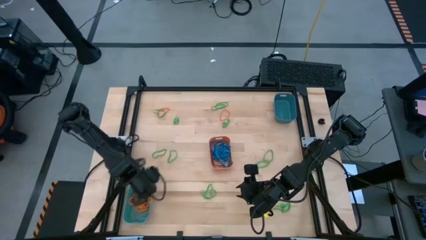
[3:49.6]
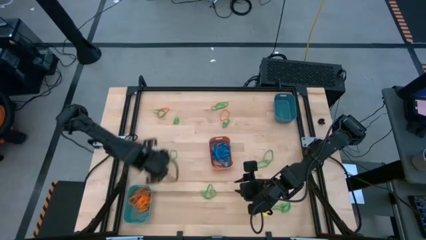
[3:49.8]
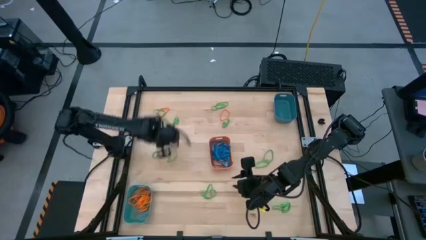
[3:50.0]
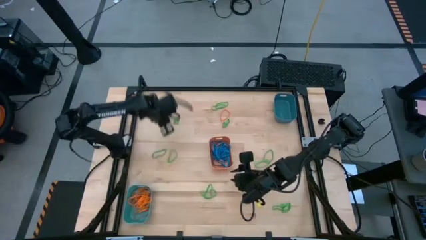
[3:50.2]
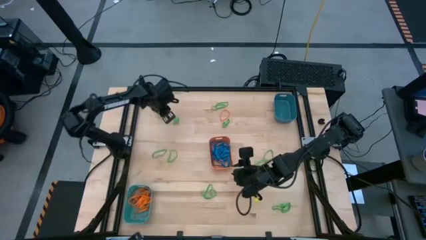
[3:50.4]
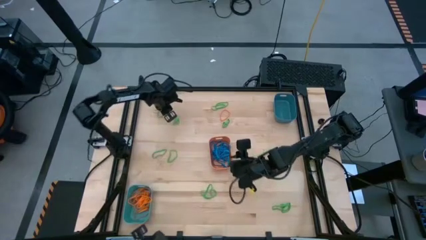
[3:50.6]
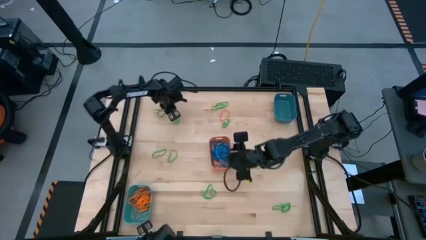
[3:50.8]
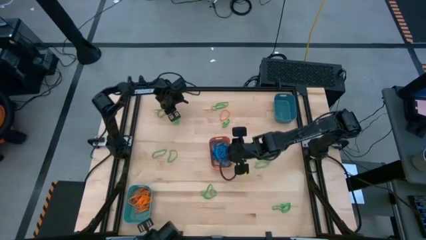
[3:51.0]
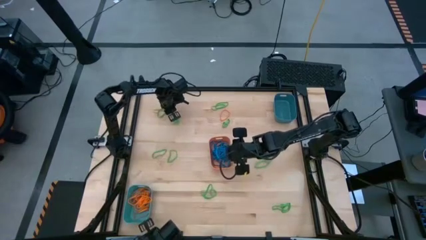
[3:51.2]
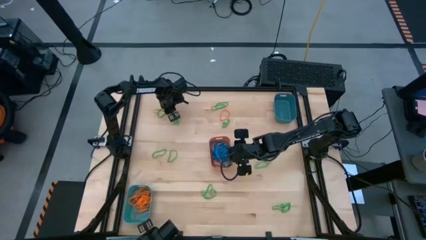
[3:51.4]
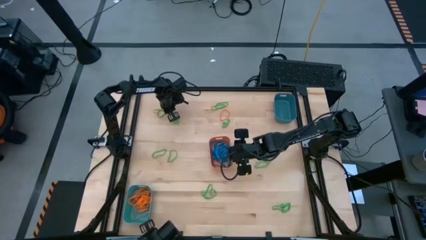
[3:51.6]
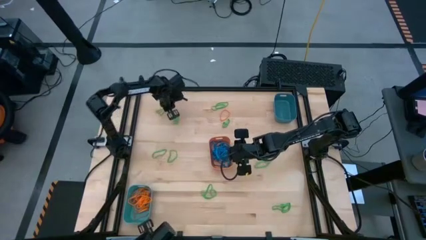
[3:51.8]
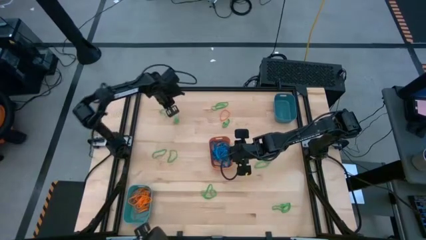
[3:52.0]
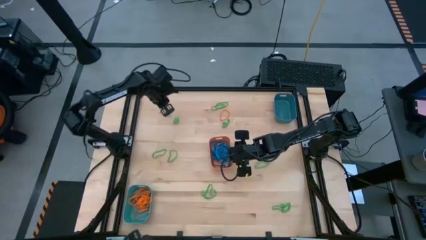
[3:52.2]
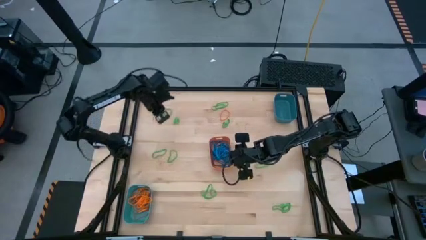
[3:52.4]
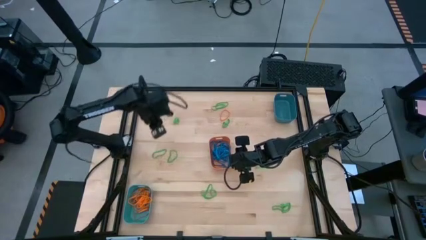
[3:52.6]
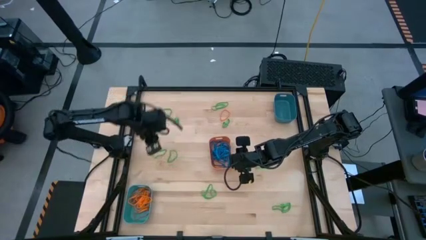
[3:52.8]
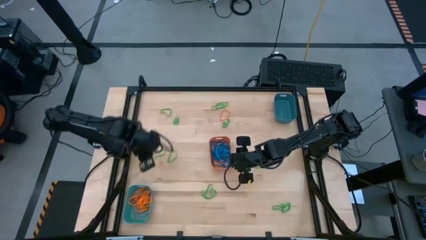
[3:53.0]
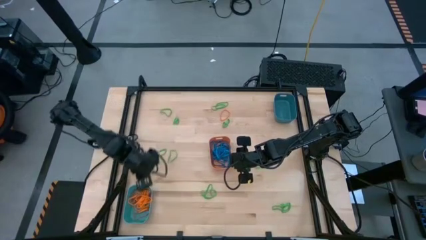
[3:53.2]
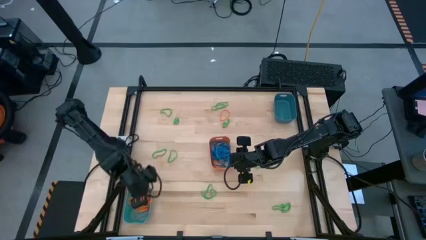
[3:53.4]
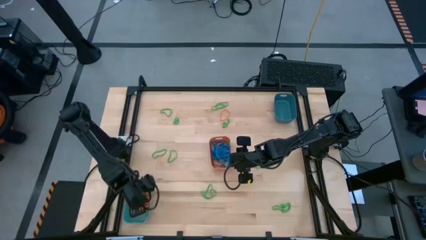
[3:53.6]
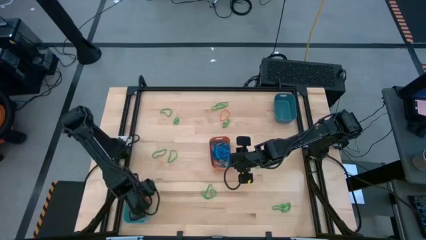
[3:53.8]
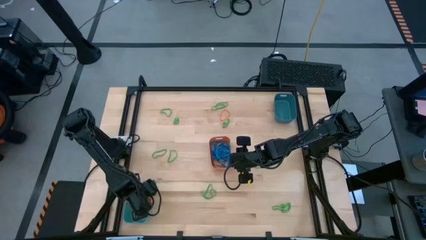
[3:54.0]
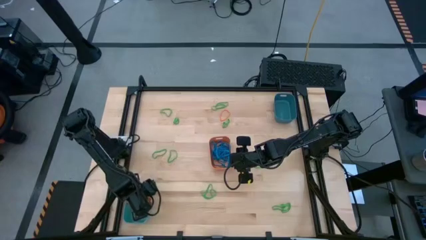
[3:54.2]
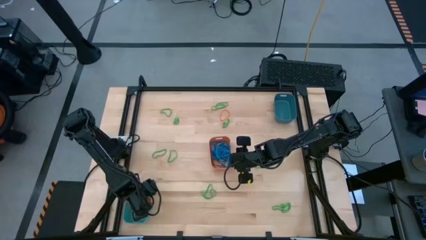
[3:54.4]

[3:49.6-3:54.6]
Task: Sort rubber bands into baskets
Put the orange rubber band into the green bin

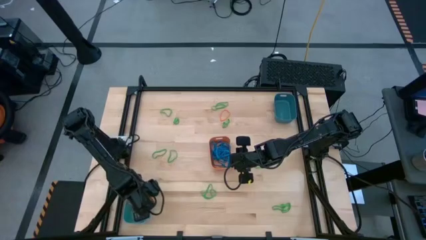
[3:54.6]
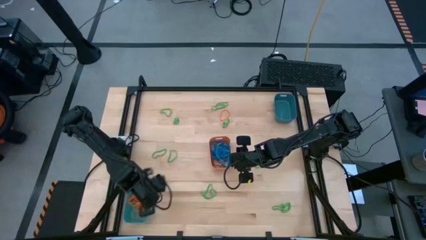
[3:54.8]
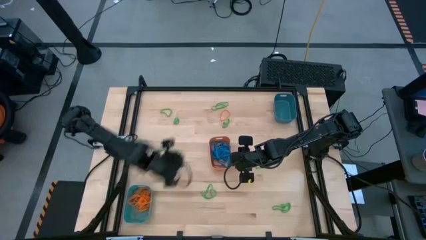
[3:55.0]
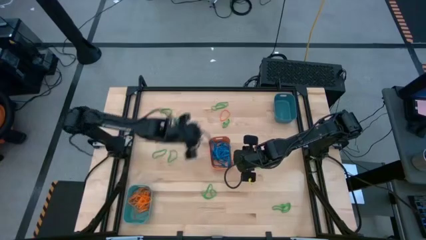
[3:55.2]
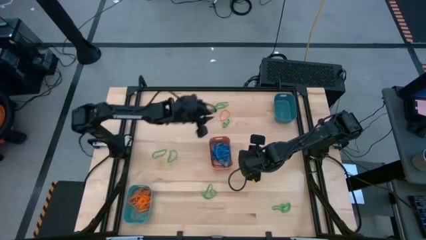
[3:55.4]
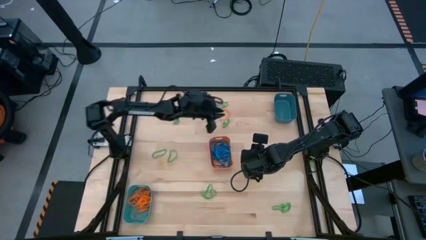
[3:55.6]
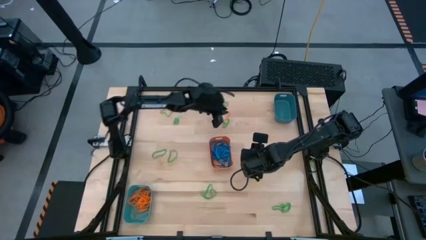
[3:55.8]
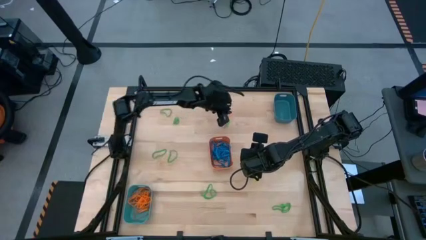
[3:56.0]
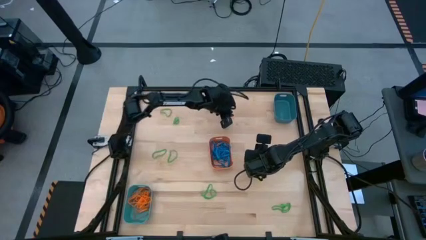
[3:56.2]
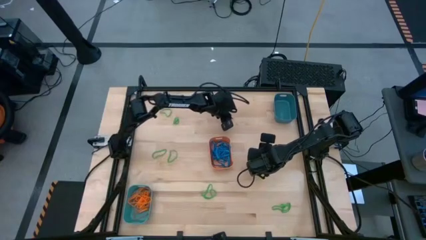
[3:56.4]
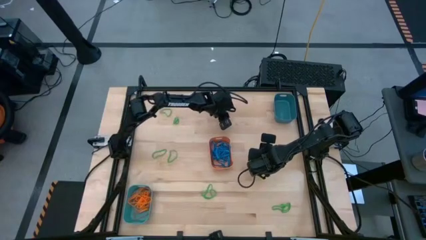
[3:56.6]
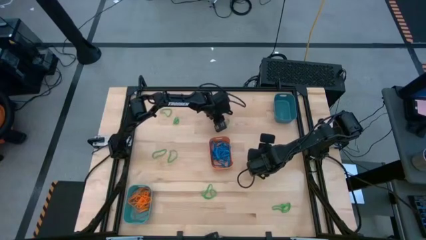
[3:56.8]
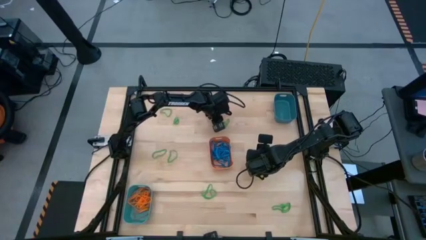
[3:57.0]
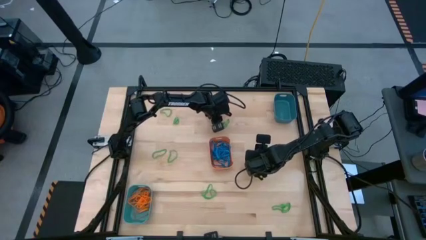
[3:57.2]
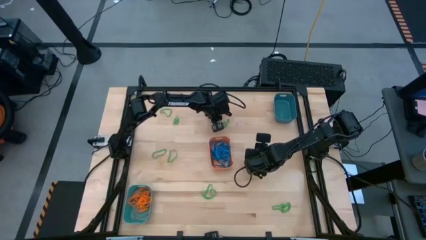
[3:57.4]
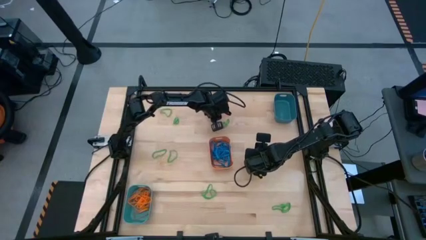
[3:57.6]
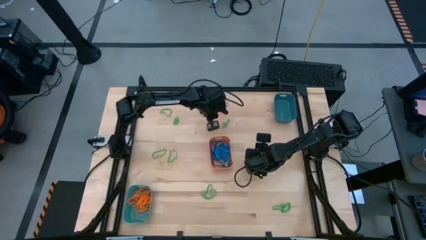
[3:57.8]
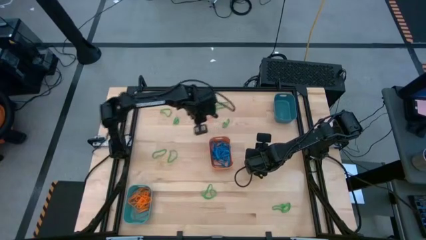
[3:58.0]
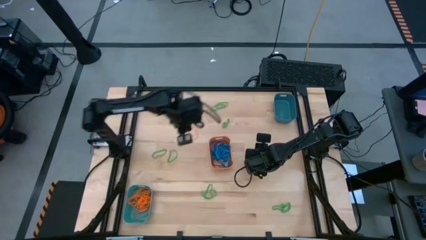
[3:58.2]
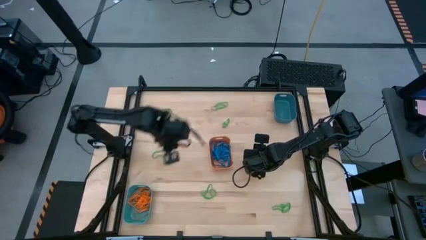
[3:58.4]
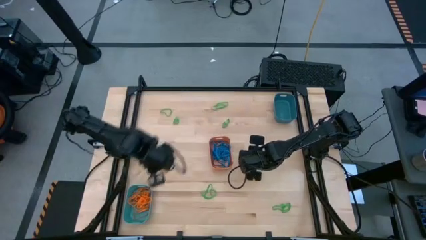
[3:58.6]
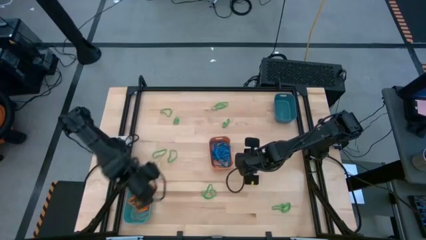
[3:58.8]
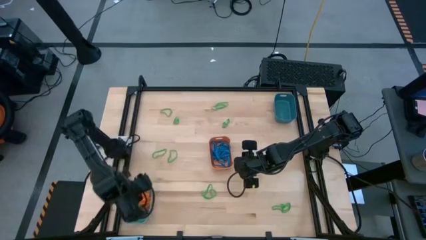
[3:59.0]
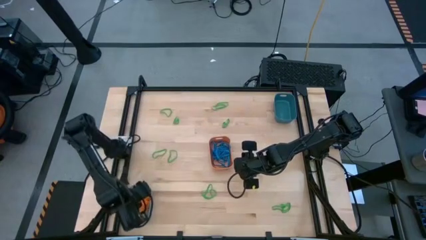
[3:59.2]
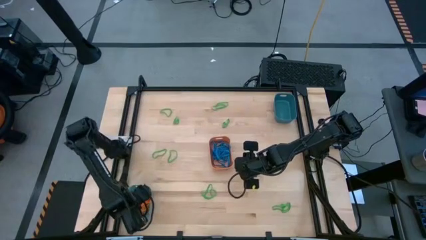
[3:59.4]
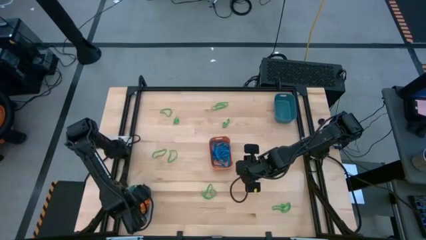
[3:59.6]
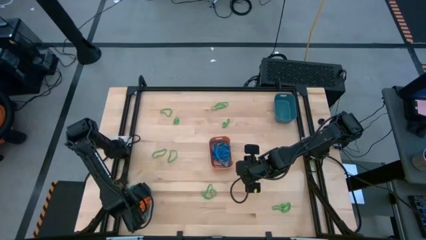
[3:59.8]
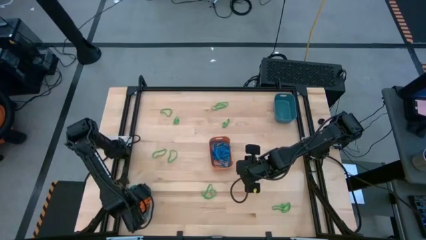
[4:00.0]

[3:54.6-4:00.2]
Put the orange rubber band into the green bin

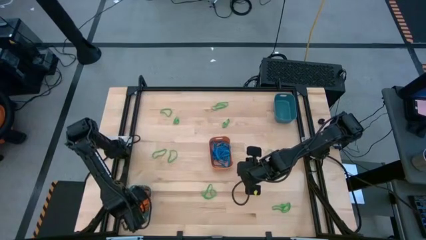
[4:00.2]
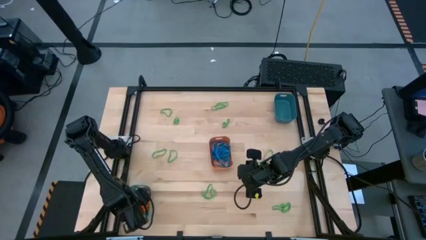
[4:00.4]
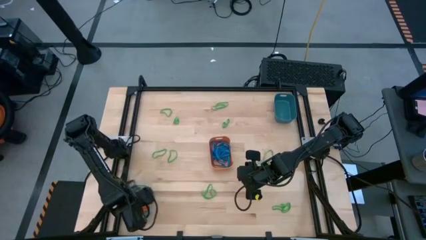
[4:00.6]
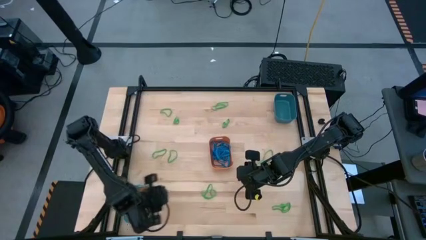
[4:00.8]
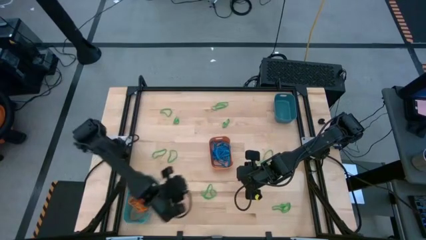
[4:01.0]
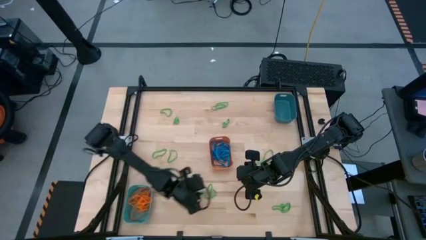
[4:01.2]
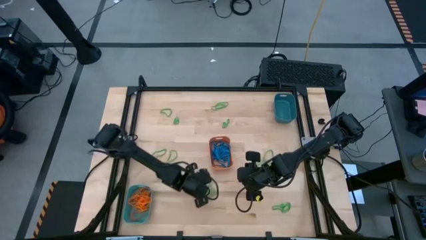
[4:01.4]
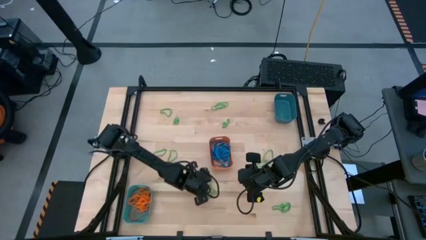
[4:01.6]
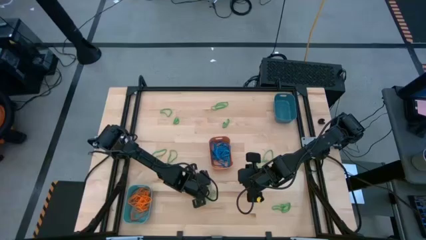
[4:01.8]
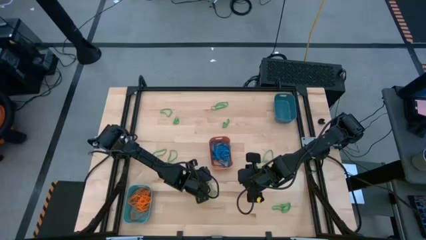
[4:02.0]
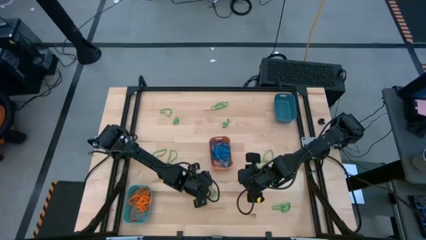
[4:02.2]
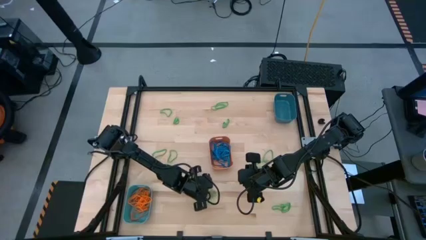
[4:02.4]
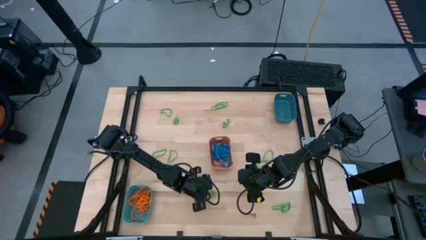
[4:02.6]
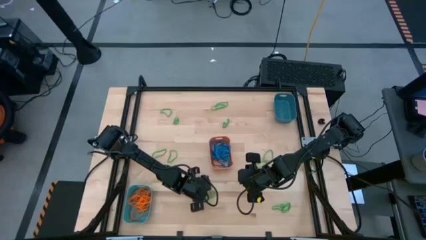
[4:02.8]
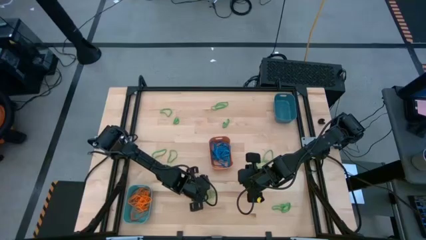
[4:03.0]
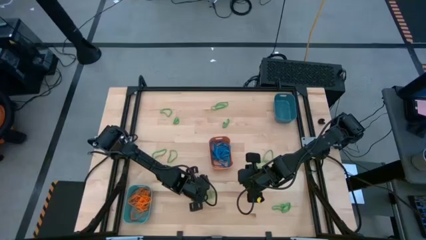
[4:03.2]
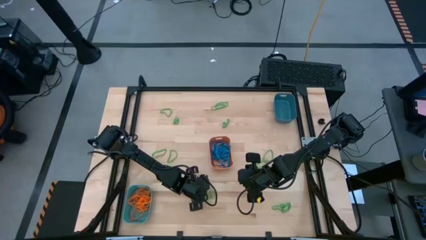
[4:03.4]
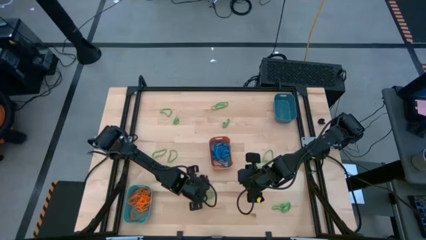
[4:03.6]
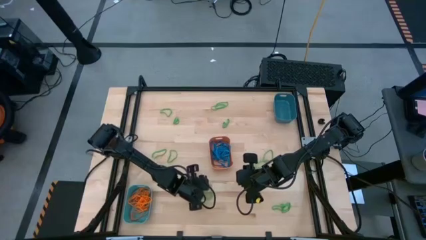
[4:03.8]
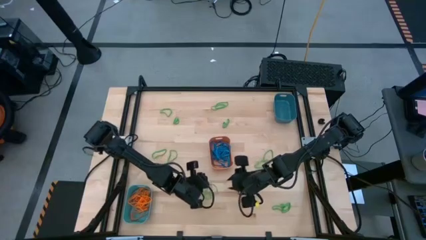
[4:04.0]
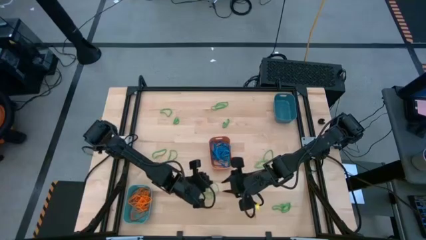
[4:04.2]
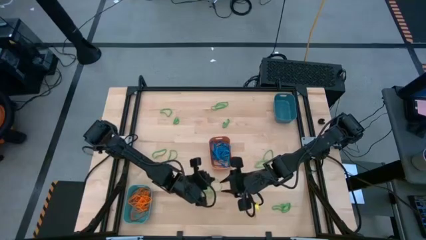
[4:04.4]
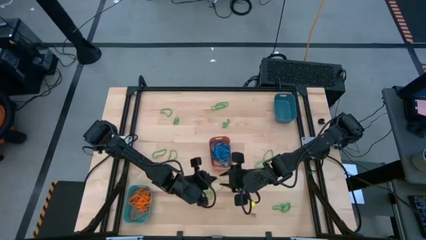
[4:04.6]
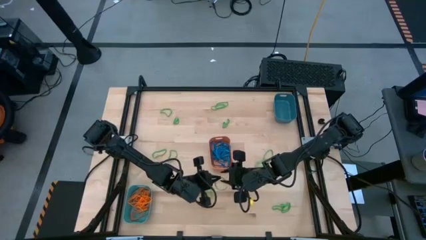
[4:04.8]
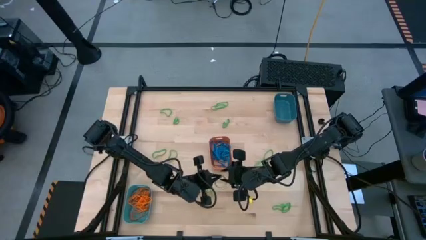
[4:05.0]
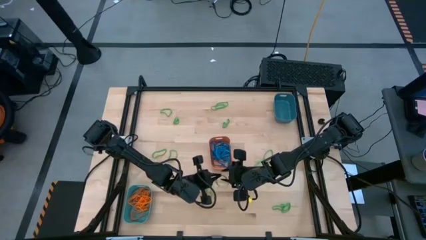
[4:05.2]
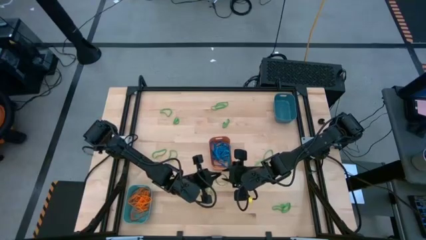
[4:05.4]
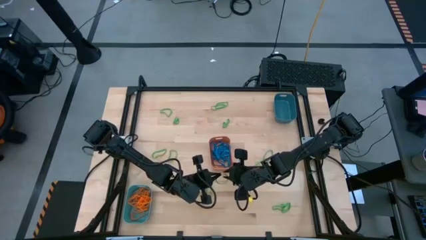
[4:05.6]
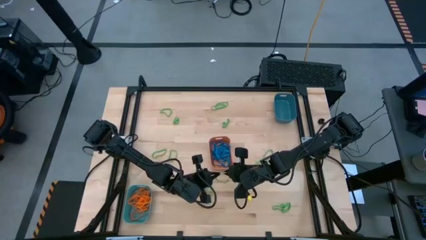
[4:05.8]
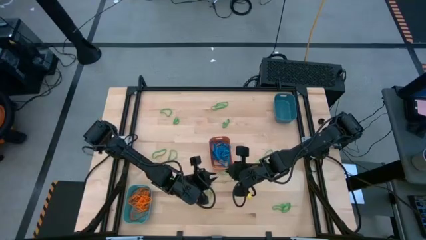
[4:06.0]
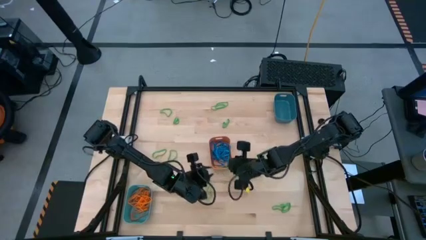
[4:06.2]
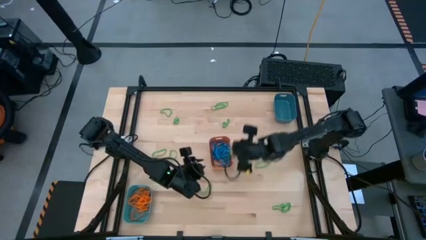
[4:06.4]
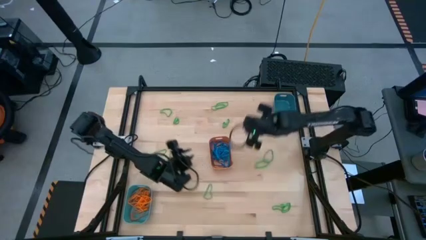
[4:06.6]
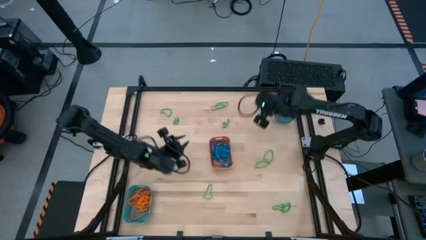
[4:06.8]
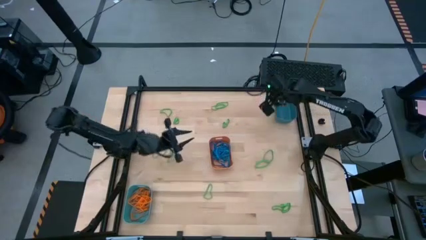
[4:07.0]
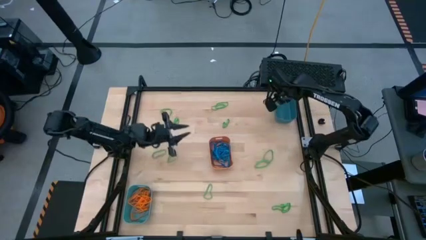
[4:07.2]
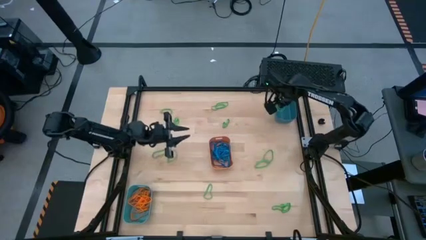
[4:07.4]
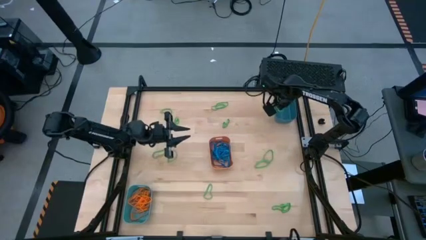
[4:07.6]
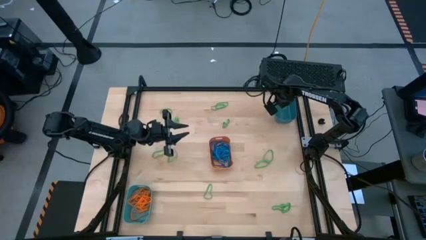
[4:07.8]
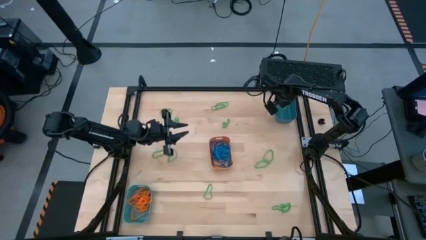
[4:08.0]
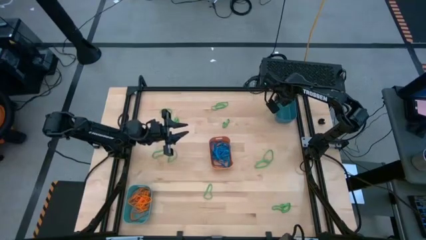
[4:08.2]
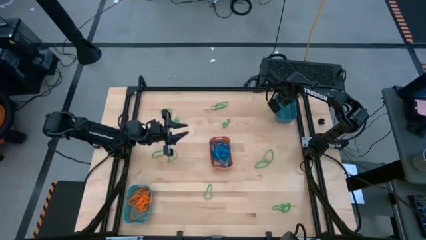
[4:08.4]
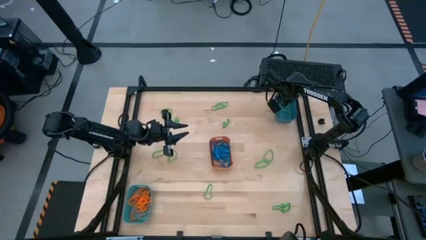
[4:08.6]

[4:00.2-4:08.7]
Put the green rubber band into the blue bin
